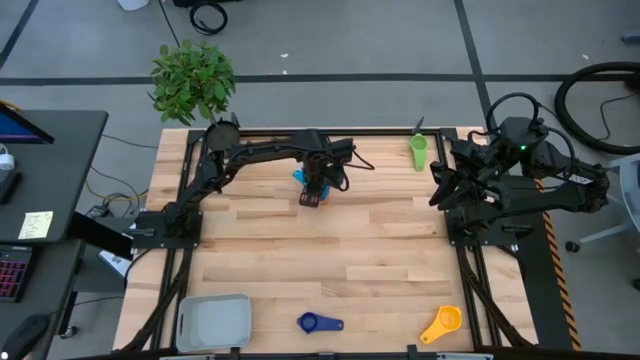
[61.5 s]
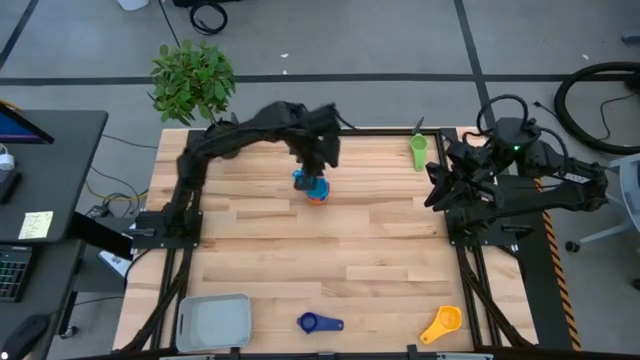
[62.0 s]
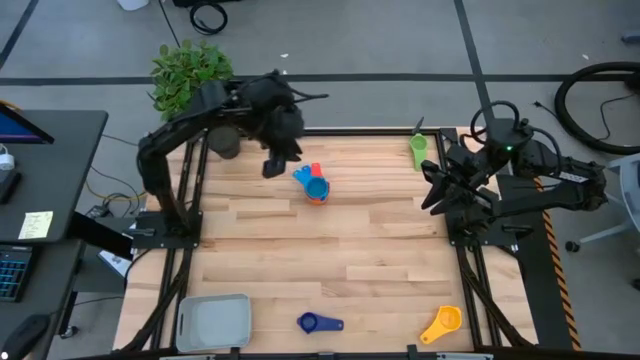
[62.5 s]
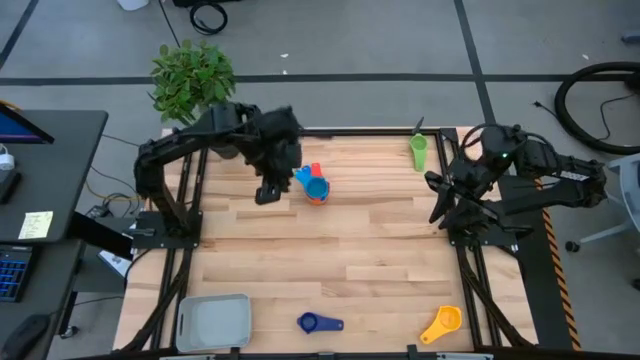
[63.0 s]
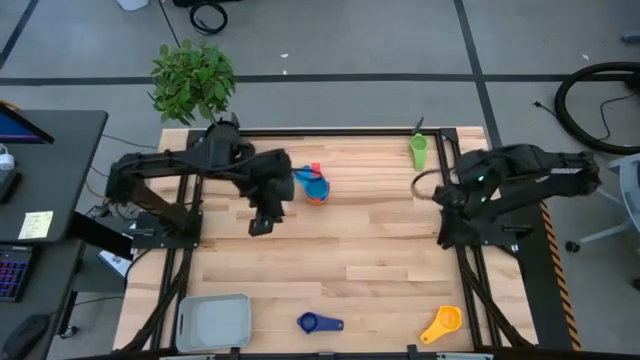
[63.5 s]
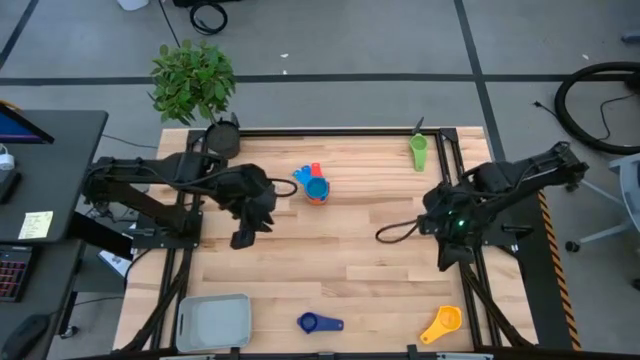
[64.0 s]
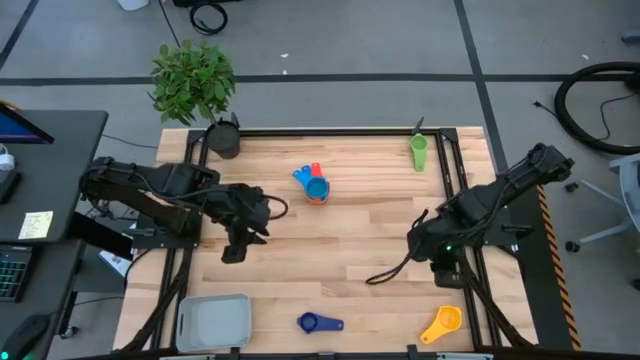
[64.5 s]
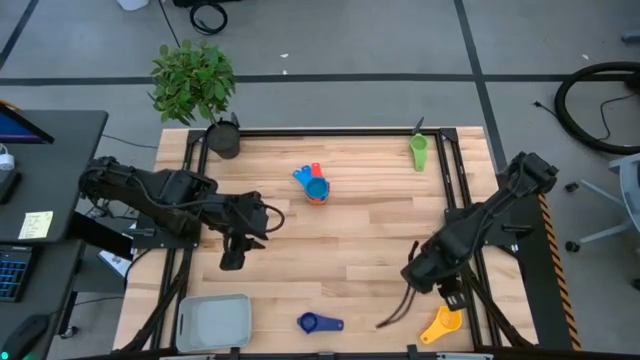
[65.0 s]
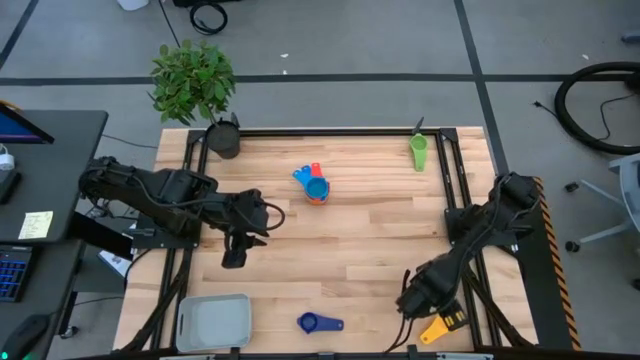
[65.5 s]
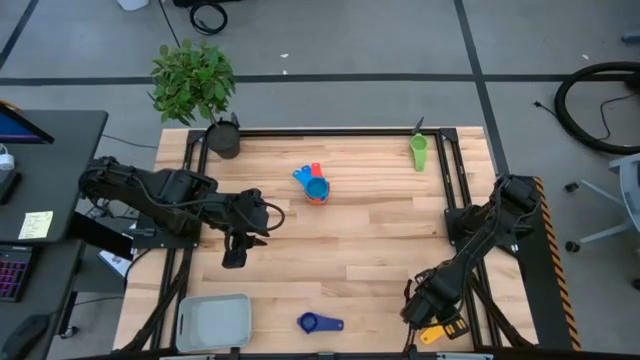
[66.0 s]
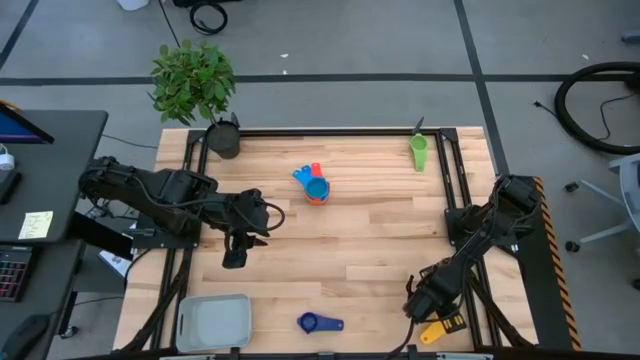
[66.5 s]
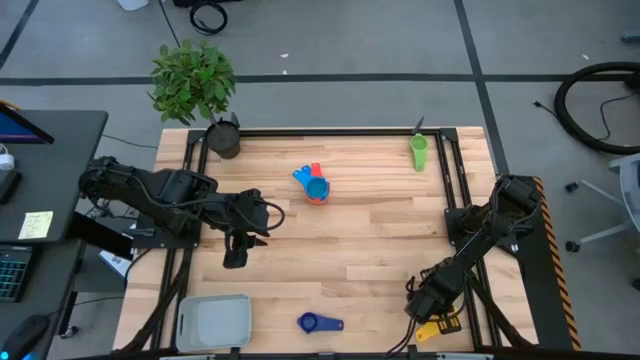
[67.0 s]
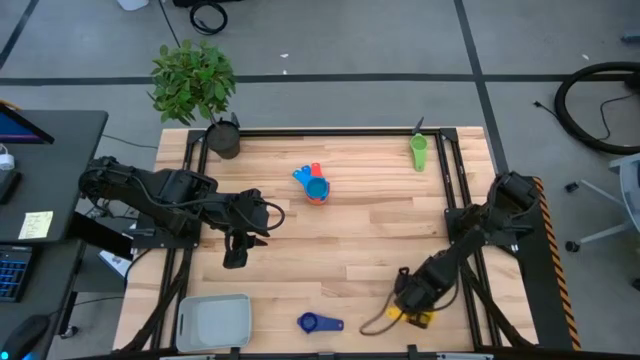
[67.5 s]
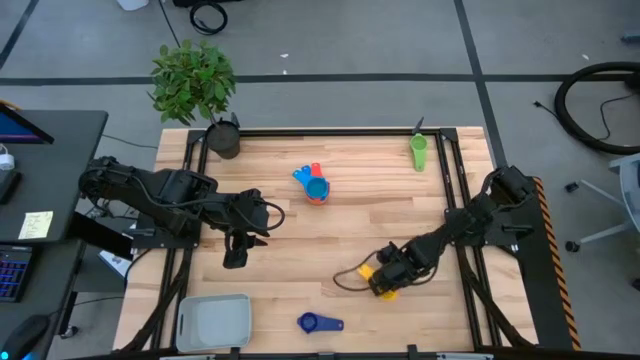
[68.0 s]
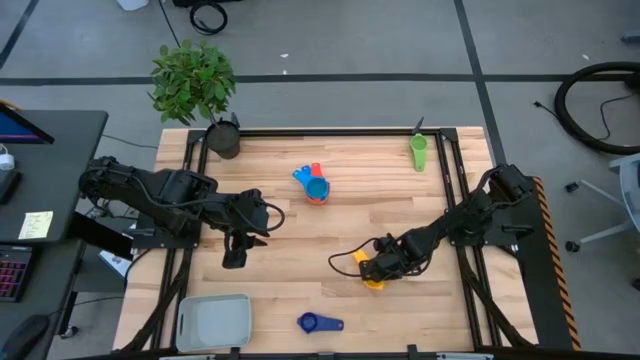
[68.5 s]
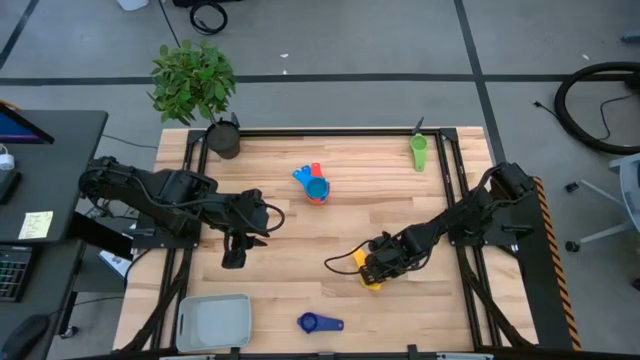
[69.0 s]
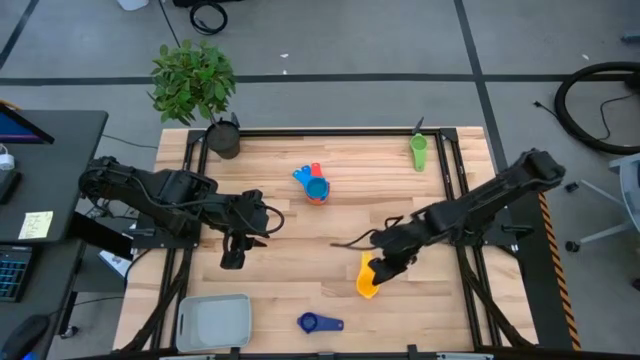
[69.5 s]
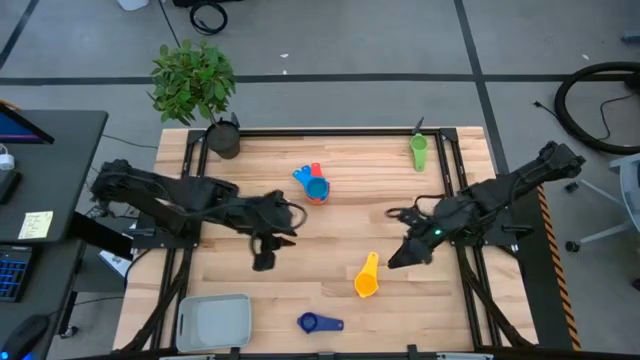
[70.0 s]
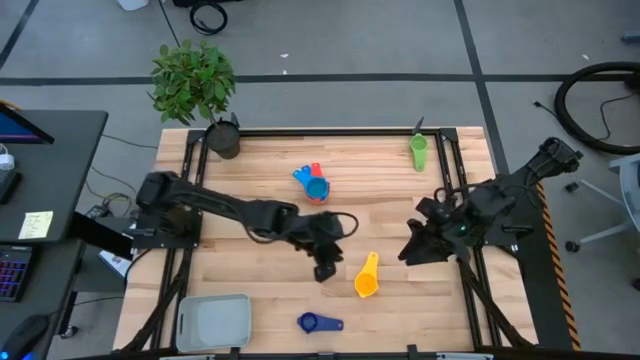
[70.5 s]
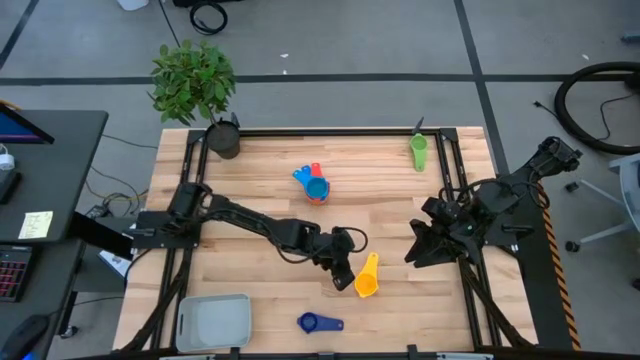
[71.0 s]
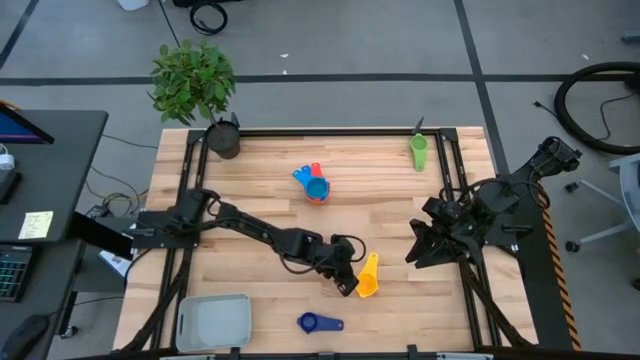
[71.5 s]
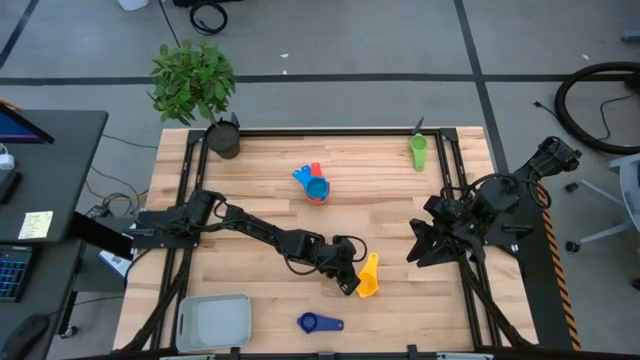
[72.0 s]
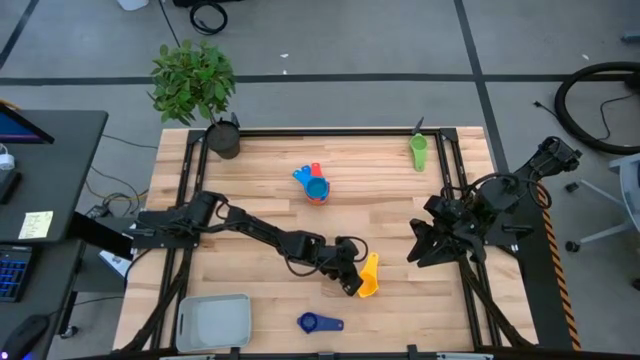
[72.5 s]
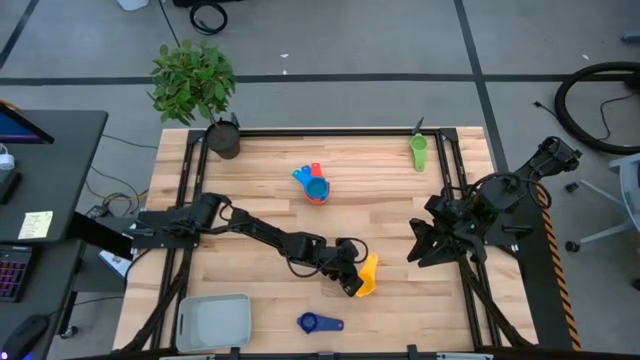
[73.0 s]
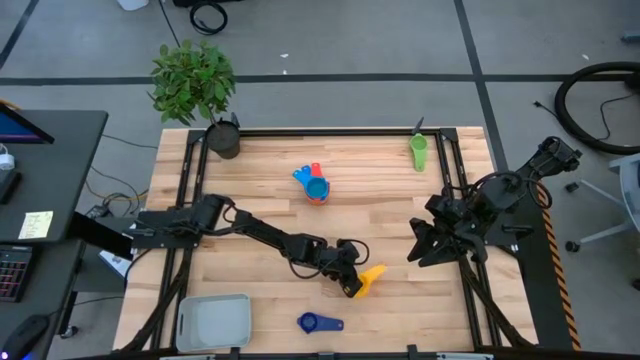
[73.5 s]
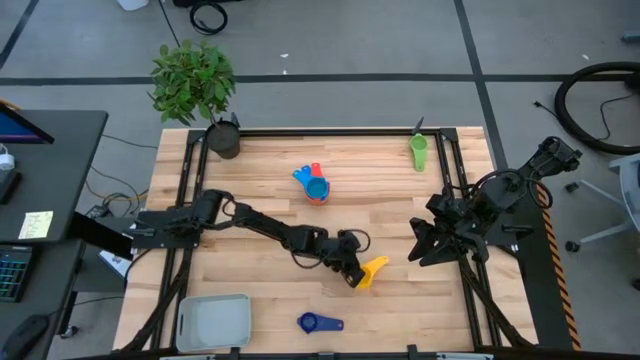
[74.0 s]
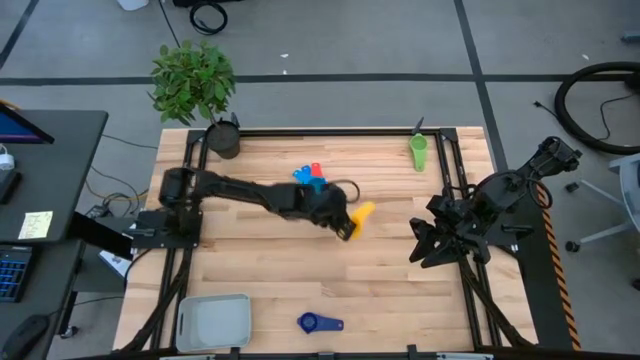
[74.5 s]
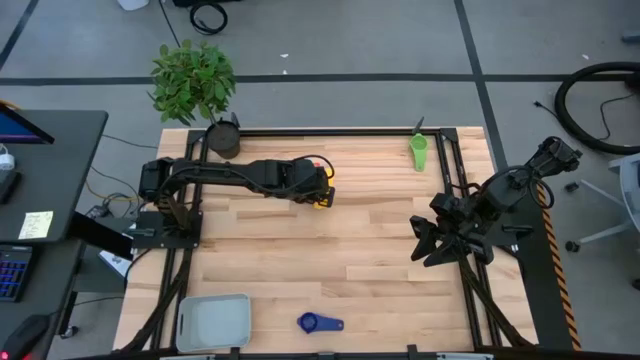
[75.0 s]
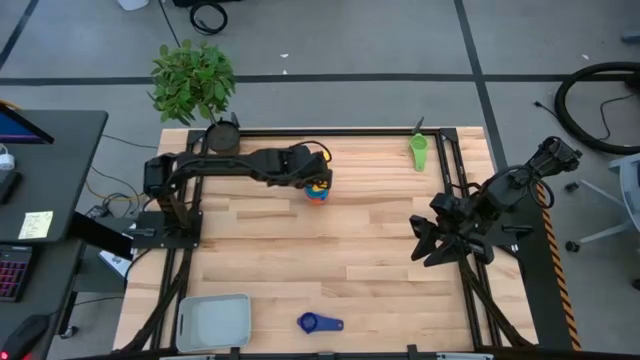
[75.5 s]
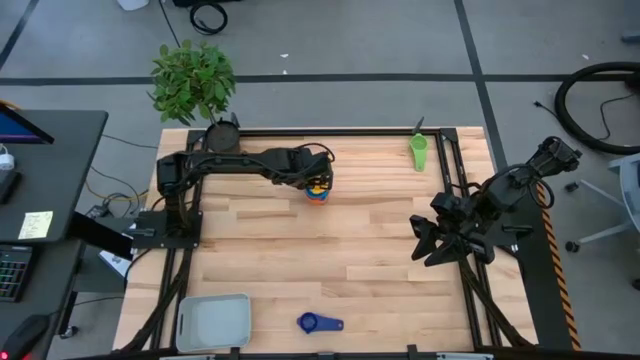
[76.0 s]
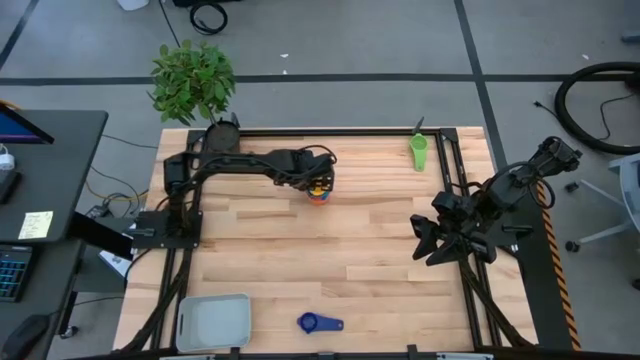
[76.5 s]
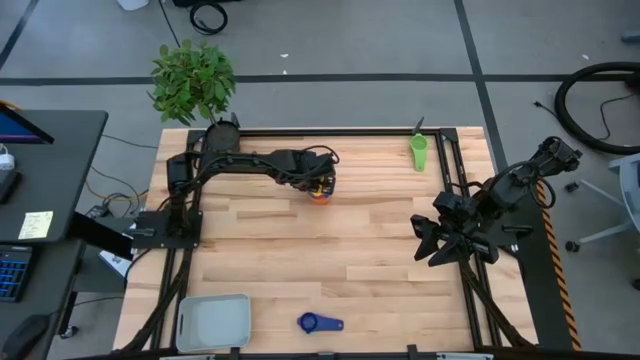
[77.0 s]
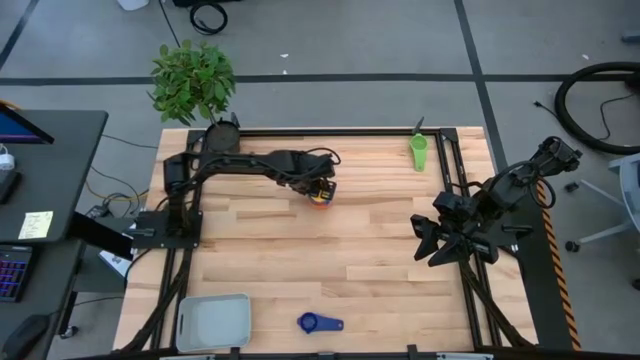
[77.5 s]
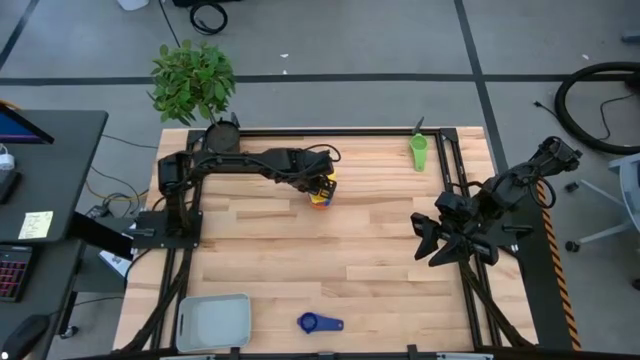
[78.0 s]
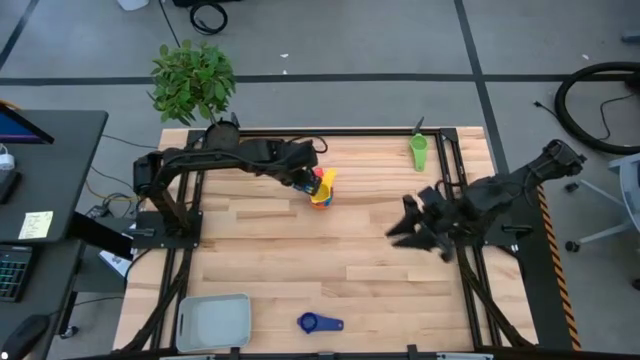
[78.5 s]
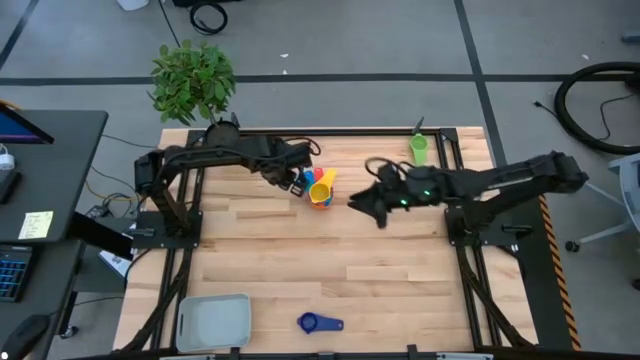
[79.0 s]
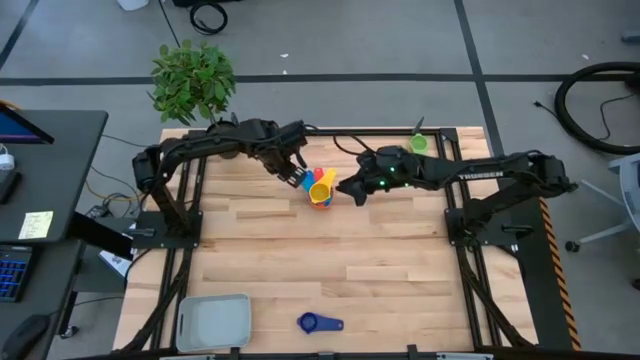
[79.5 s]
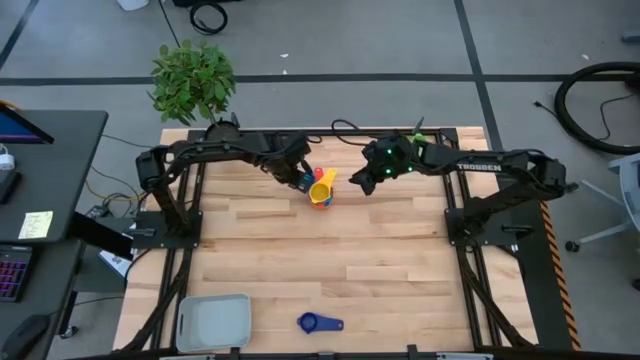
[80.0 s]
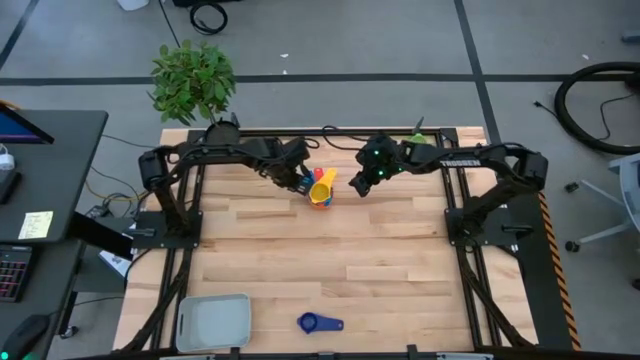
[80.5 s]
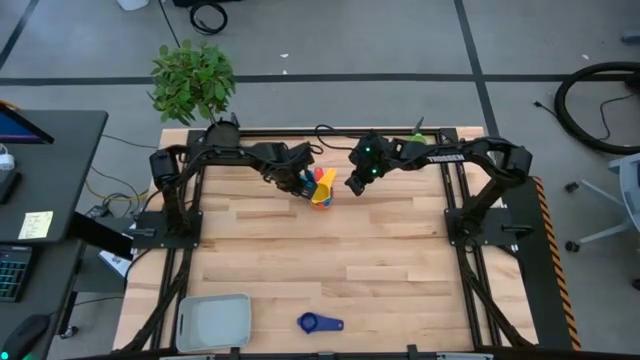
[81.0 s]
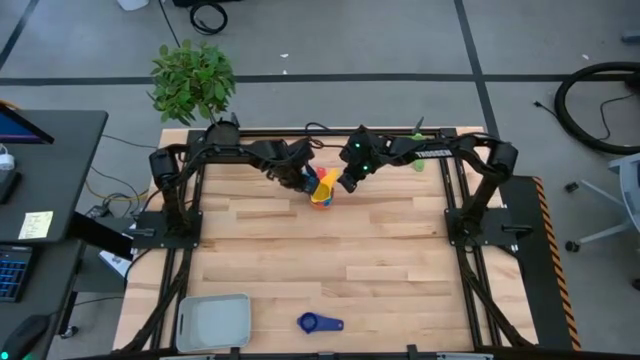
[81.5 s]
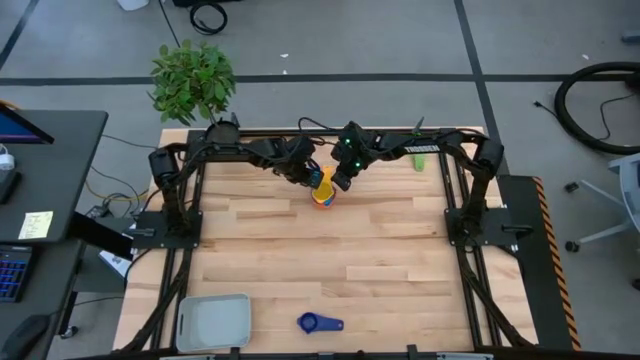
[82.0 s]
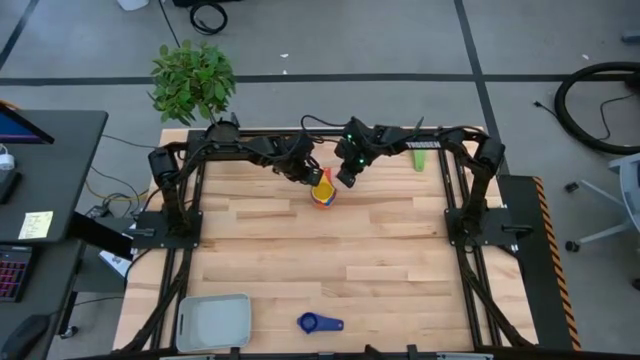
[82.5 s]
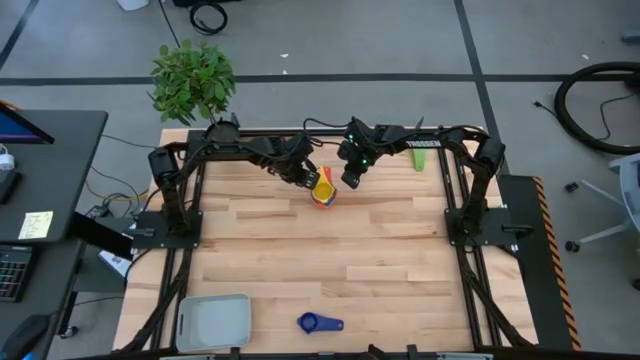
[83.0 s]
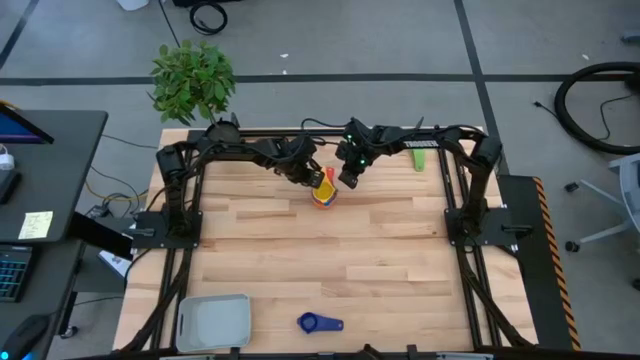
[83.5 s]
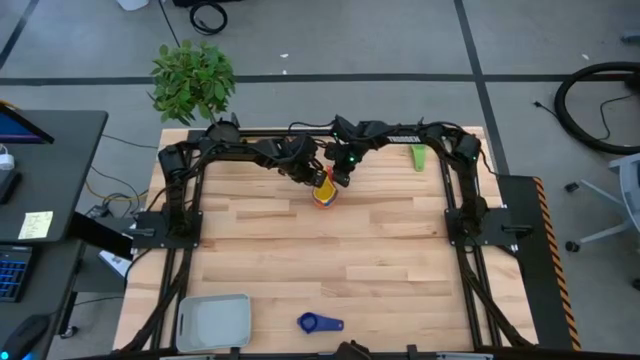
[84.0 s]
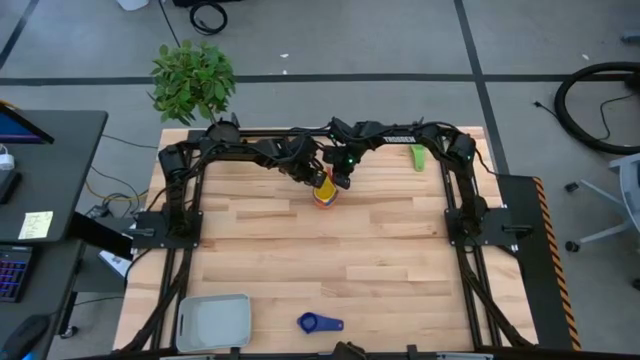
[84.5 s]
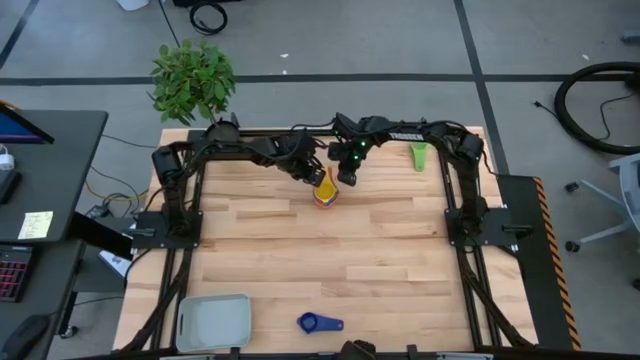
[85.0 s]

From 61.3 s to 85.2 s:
Task: Nest measuring cups in basket
Stack the yellow measuring cup on top of the light blue measuring cup
